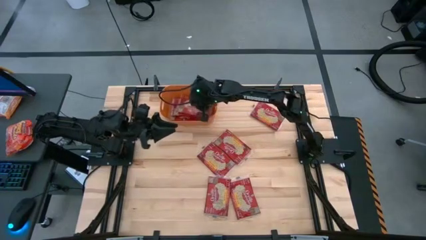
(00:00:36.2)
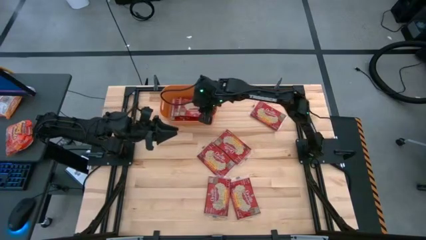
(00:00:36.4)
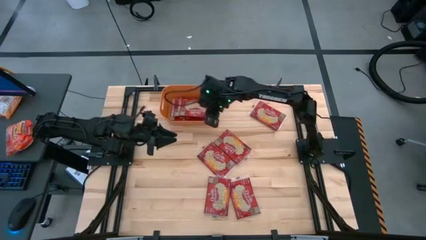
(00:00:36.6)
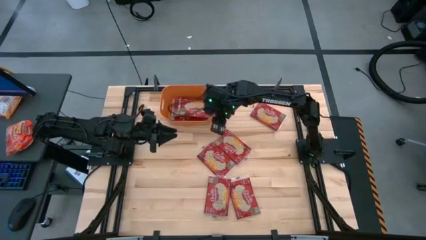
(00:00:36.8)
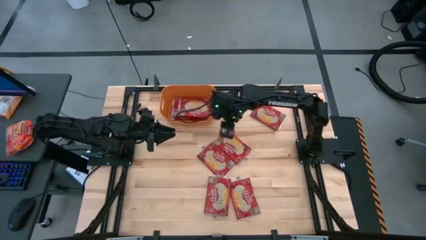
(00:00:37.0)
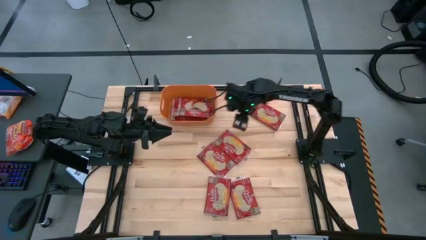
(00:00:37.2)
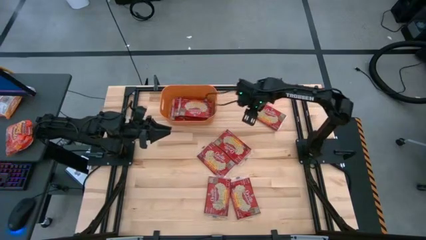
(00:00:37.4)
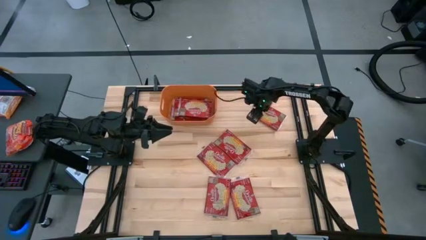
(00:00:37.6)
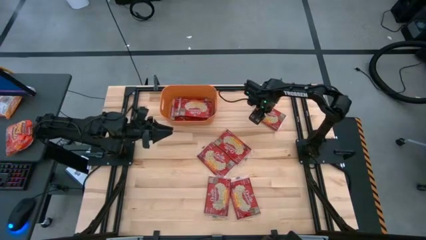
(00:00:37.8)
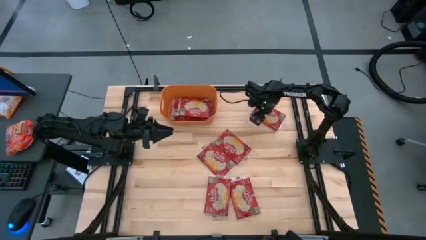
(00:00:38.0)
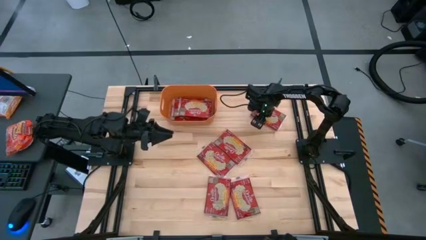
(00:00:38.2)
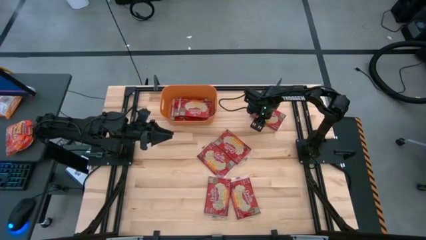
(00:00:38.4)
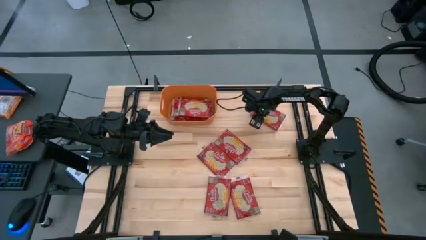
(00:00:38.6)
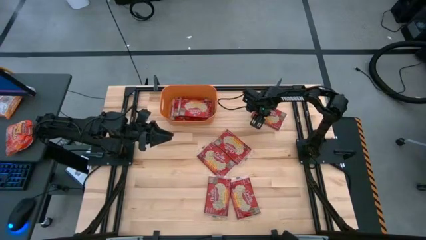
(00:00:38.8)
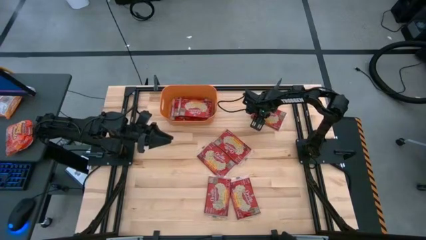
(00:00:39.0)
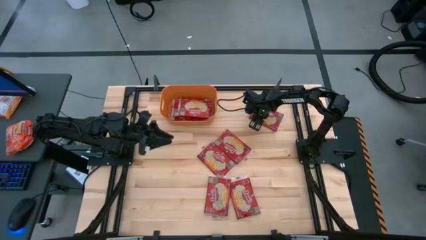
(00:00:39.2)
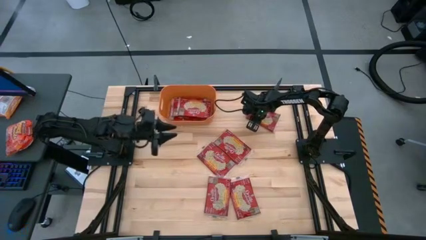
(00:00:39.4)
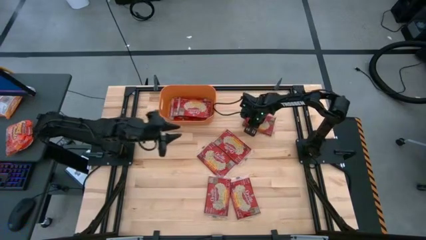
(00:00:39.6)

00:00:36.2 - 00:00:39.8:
Task: Sort popcorn bags into baskets
Put the red popcorn bag into the orange bin

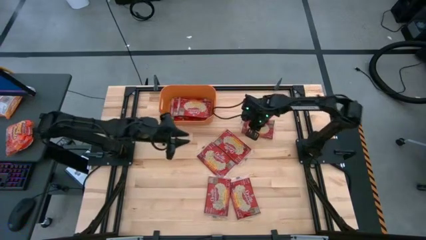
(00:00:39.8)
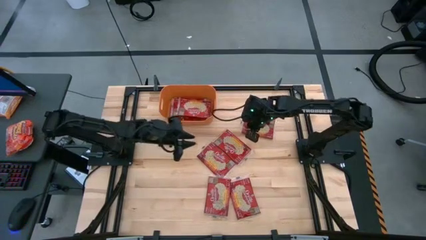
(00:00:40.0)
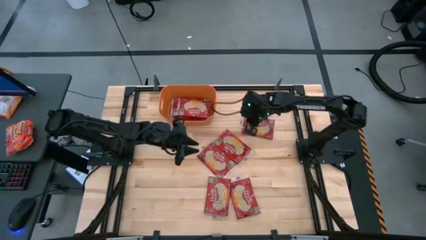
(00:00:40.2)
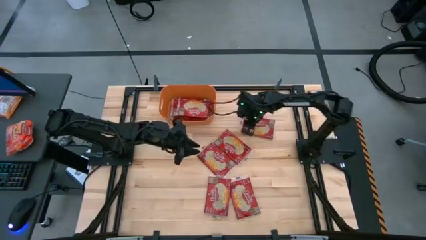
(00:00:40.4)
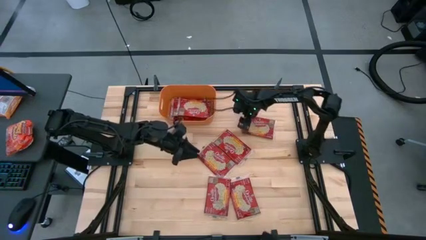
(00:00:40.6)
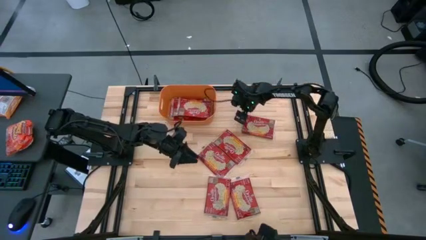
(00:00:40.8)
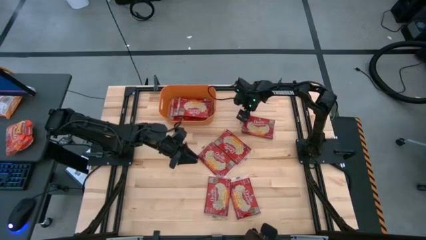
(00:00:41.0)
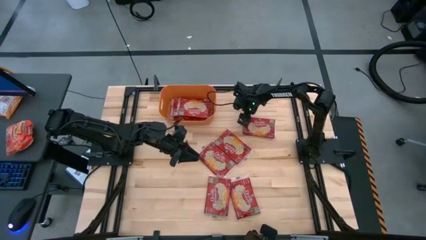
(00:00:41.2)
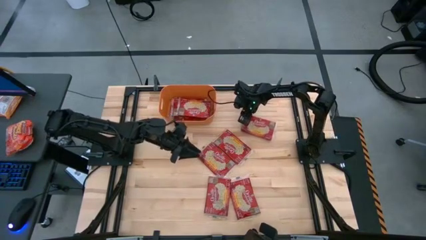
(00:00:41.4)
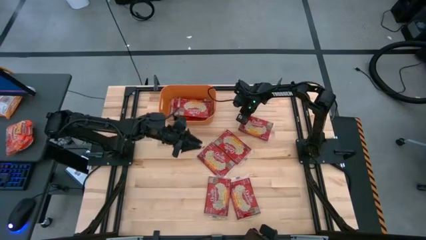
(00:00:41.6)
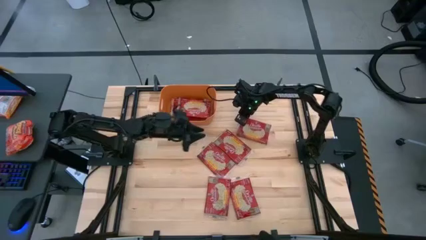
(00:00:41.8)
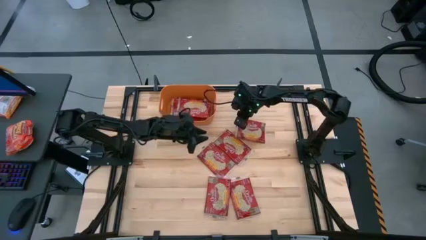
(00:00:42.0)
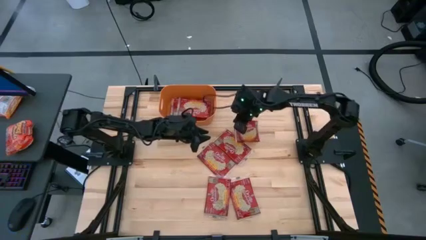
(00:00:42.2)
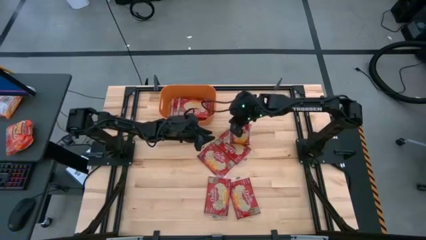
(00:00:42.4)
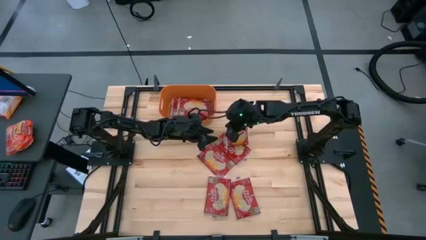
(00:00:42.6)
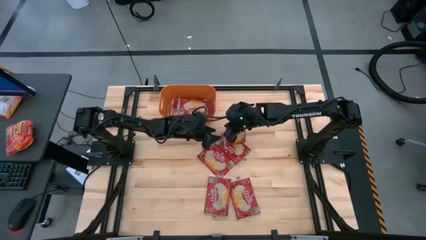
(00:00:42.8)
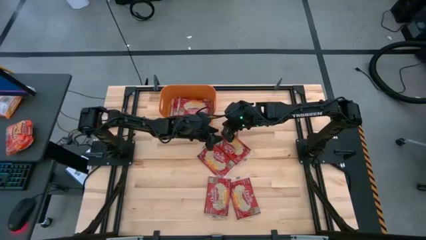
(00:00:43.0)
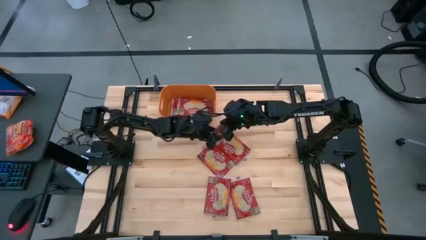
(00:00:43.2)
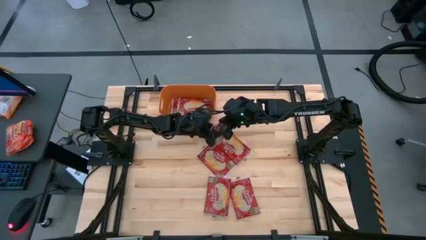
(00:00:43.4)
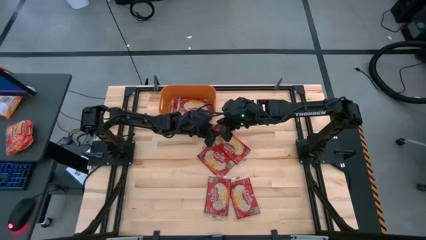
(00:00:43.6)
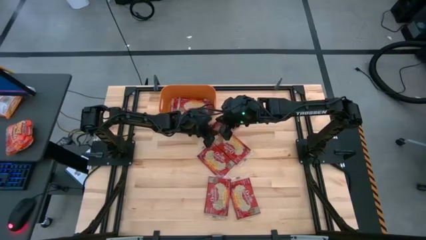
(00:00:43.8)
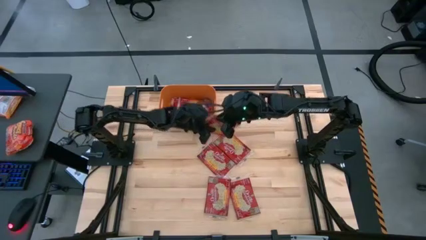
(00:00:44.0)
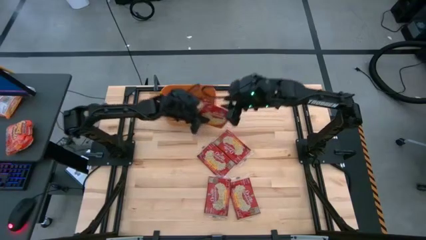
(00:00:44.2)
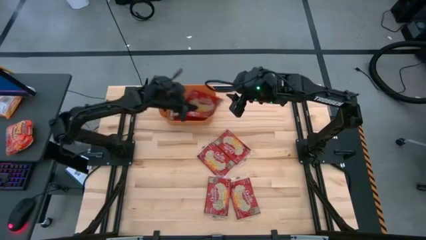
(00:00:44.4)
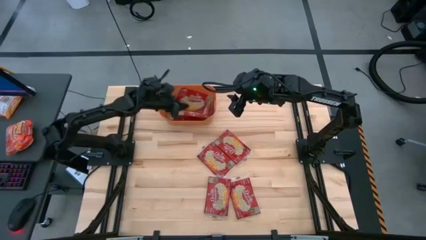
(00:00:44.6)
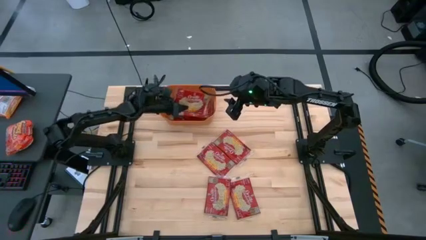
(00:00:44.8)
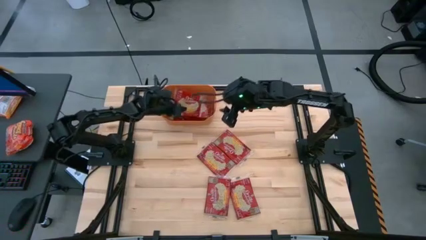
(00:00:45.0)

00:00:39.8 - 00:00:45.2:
Put the red popcorn bag into the orange bin

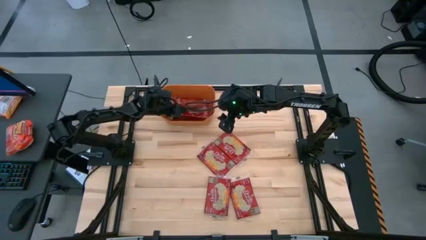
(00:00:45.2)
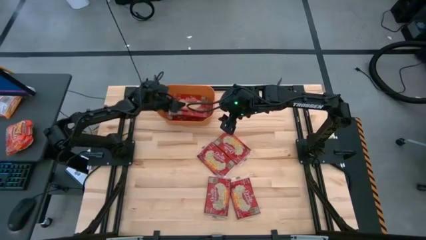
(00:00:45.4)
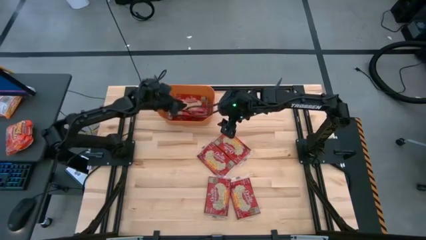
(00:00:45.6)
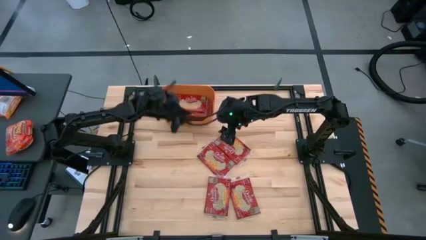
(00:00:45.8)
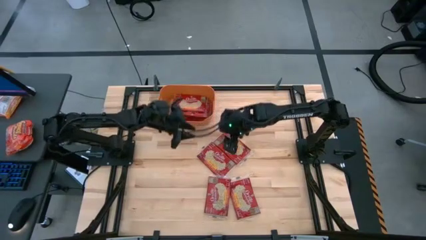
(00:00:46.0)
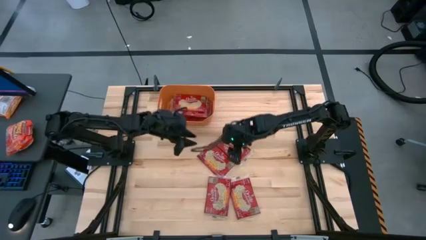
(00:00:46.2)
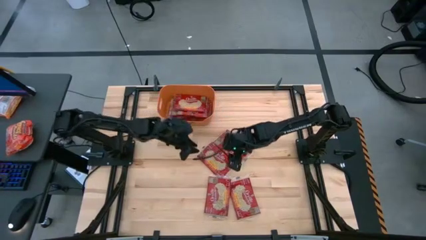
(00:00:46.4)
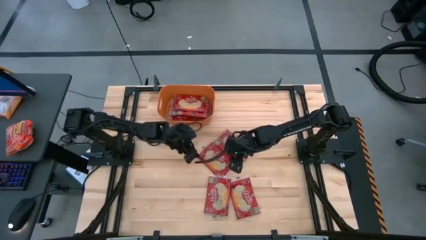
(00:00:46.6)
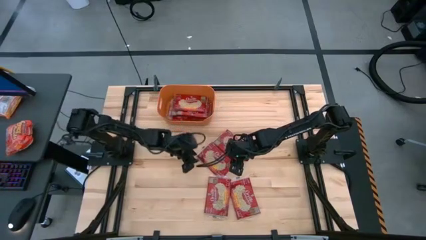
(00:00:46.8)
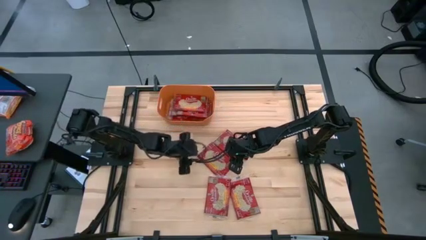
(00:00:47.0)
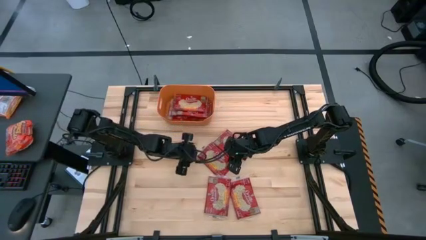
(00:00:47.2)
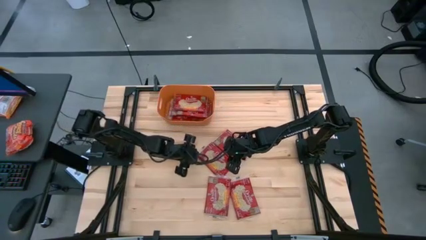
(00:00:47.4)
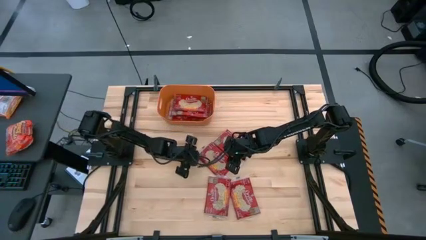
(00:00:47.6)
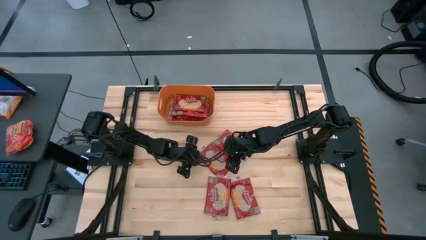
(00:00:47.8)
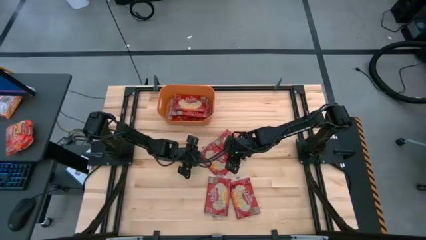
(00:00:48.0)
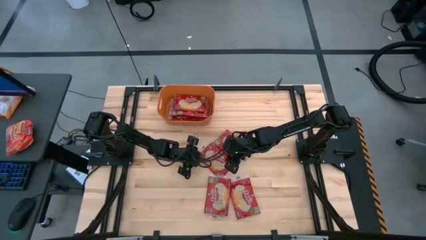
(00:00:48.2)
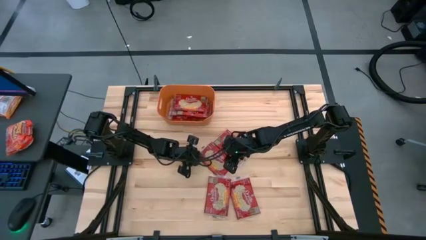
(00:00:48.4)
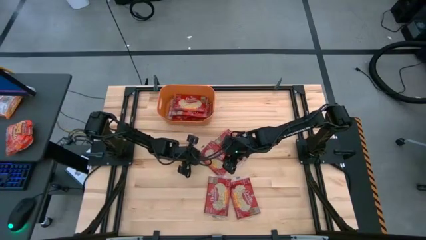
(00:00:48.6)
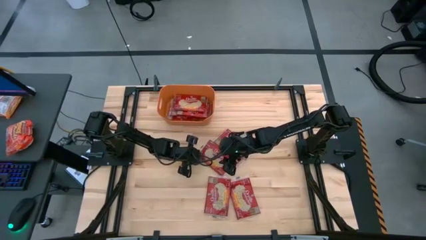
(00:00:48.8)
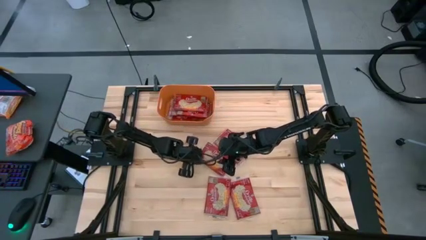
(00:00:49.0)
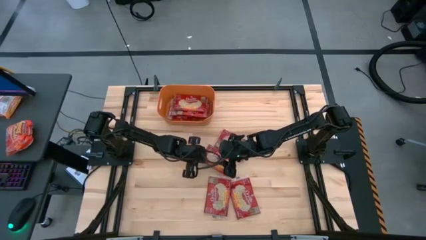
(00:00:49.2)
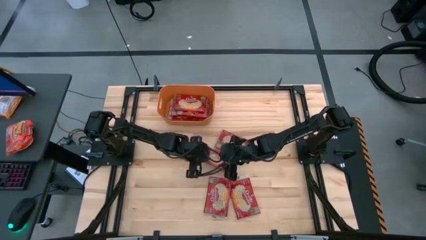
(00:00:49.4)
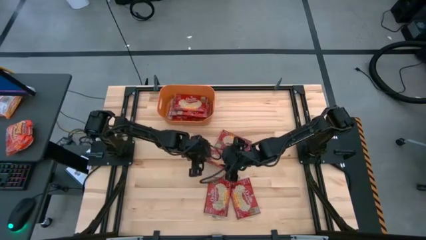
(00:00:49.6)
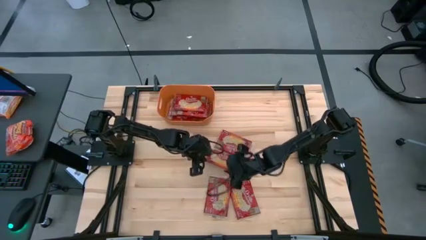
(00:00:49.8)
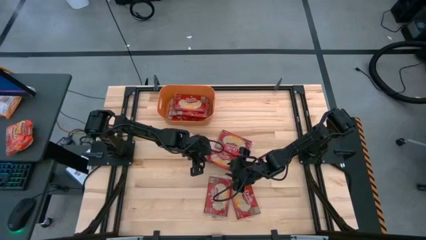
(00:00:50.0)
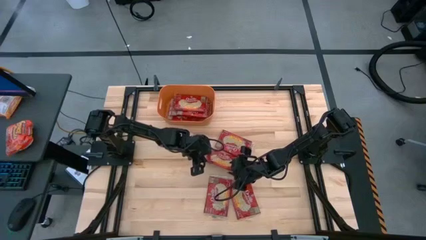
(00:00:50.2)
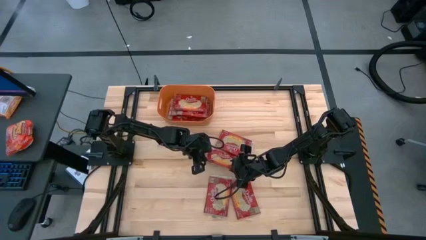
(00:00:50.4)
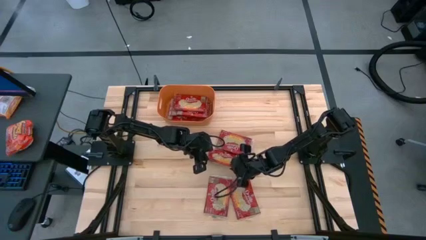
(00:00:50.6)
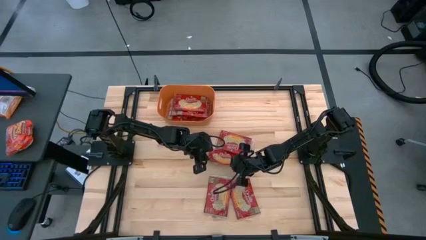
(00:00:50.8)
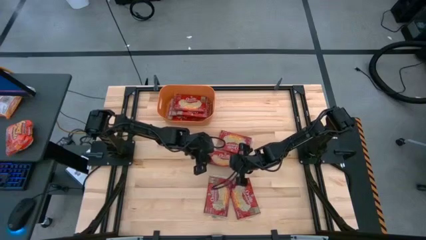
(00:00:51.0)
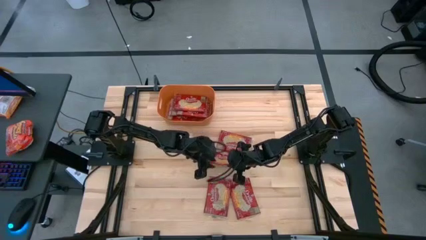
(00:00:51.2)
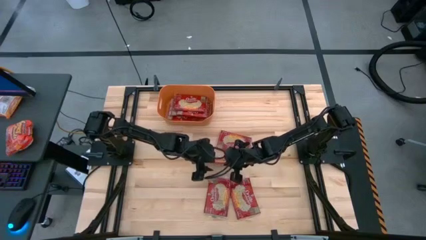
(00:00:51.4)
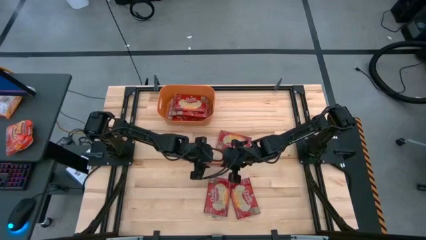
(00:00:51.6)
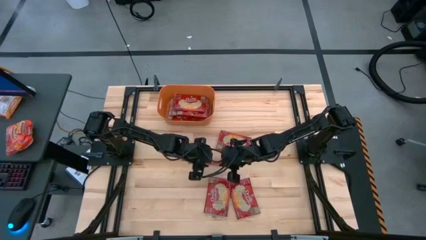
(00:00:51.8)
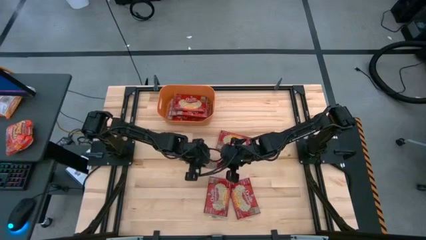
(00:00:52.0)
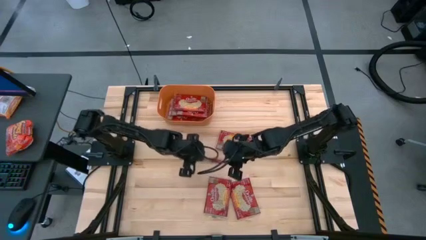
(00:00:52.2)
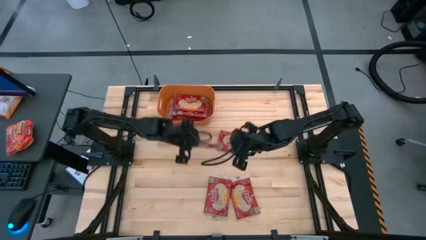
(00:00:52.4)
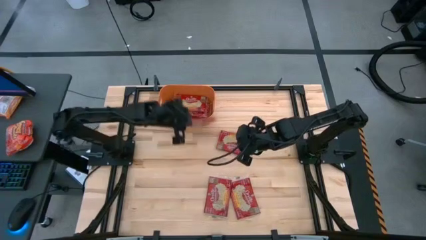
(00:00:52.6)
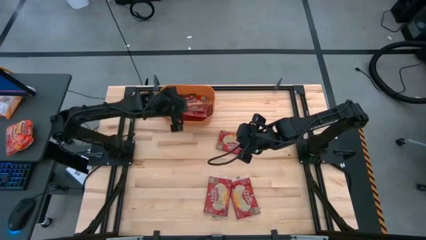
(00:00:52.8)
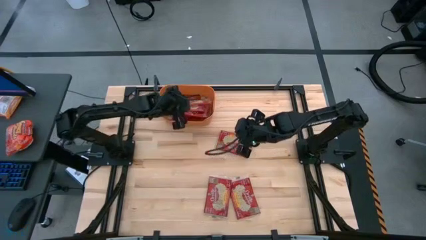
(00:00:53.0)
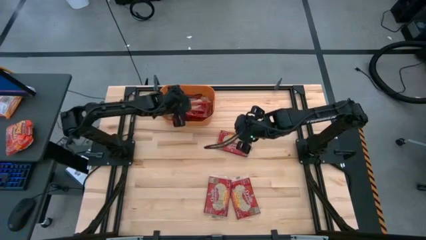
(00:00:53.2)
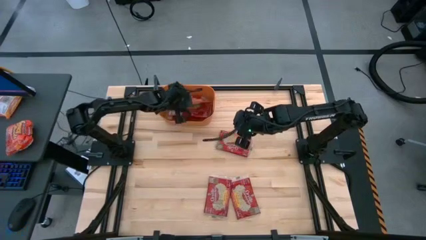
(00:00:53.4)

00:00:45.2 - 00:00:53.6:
Put the red popcorn bag into the orange bin
